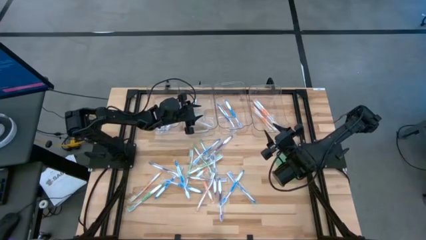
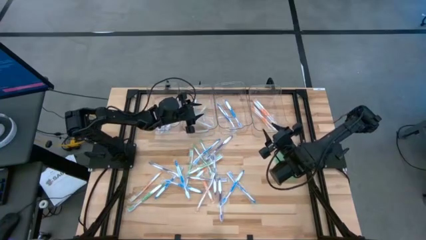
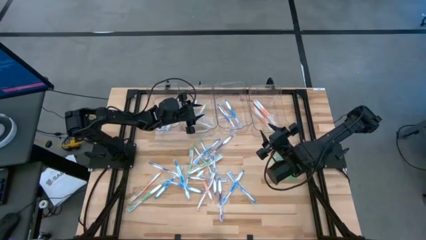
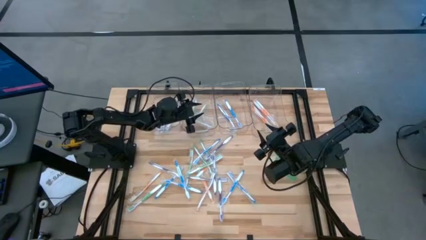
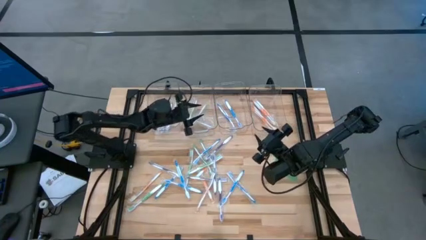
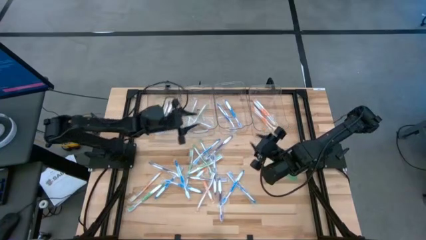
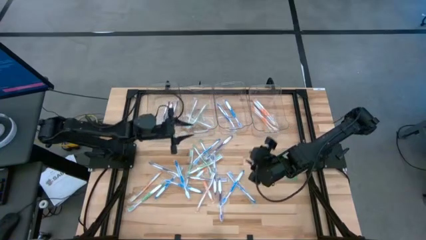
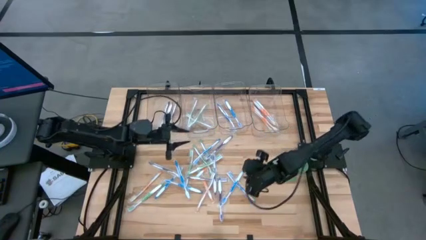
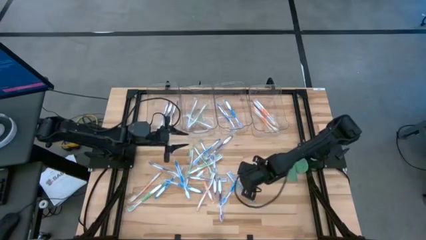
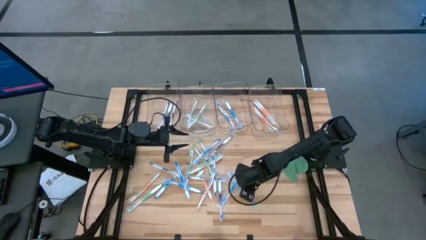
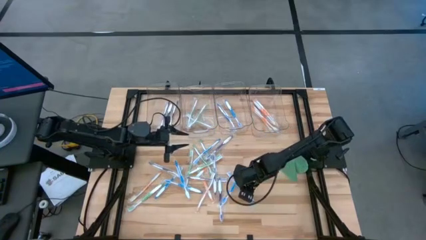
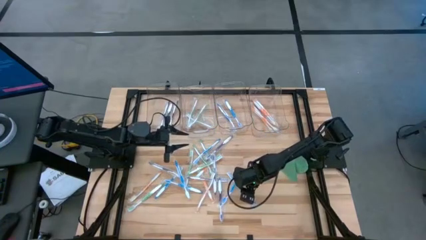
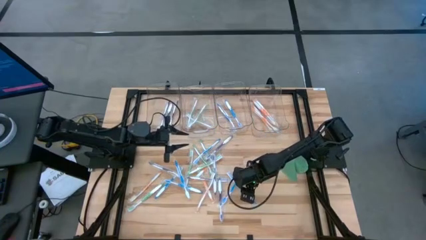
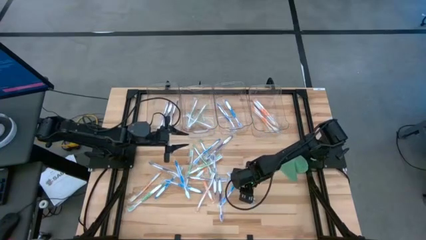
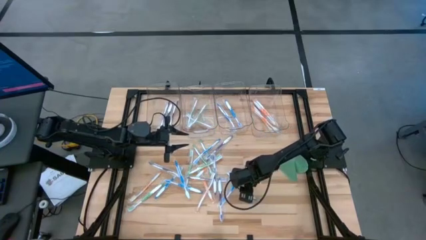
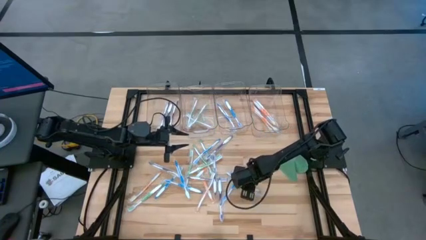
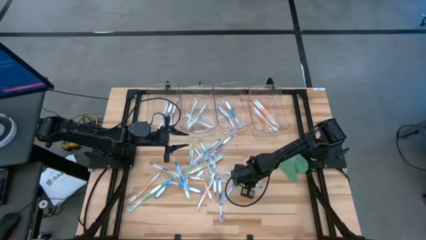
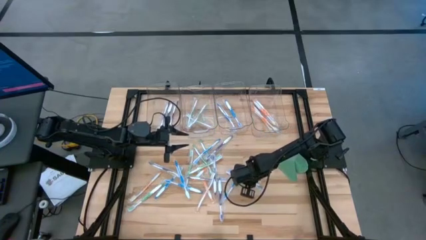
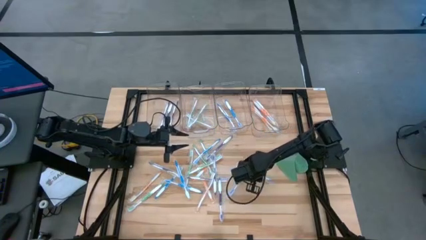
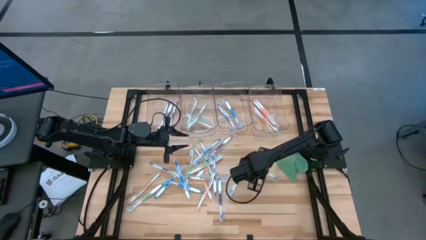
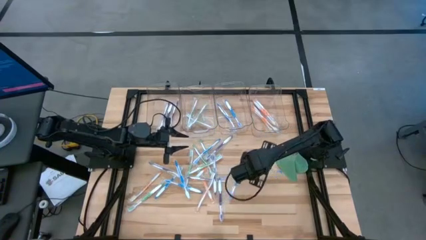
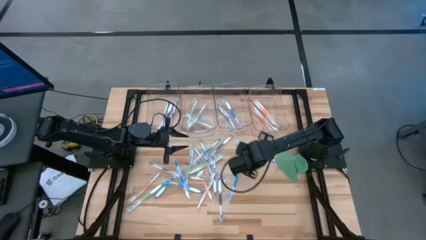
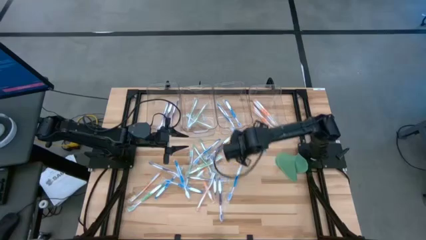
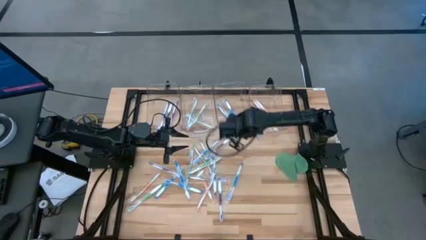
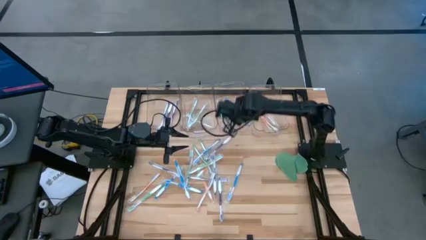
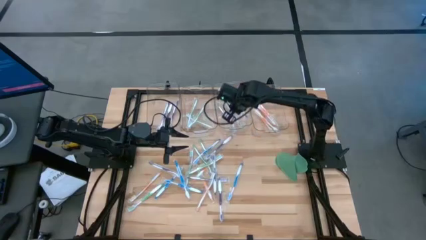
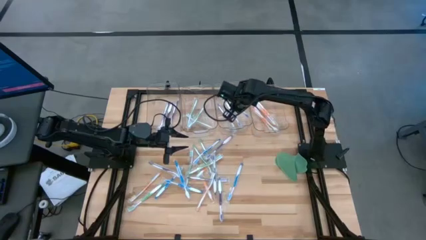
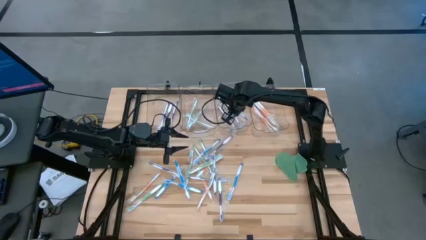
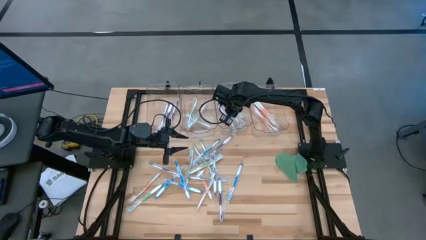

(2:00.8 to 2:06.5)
Task: Pick & Place Toothbrushes
Put the blue toothbrush into the middle right transparent bin

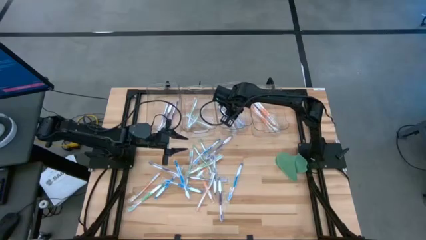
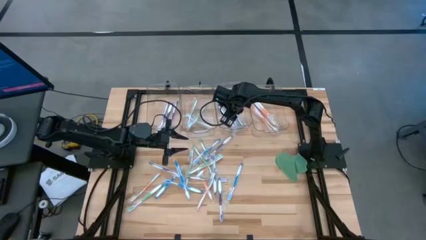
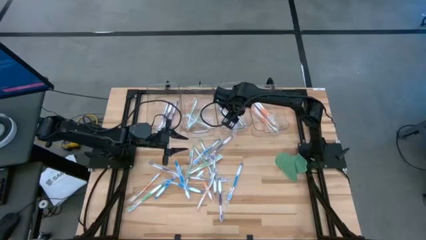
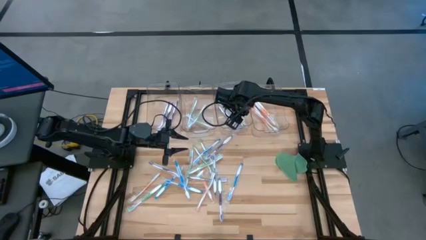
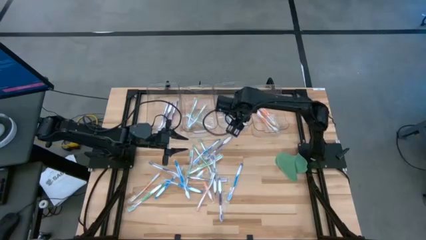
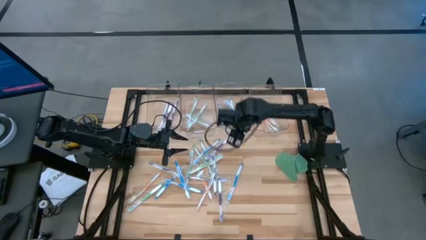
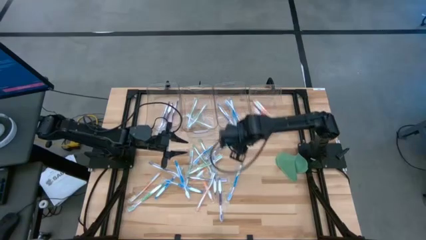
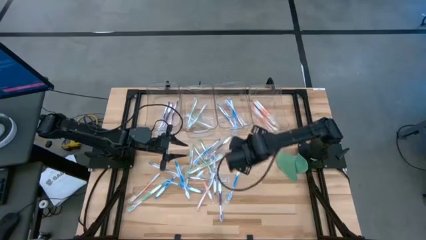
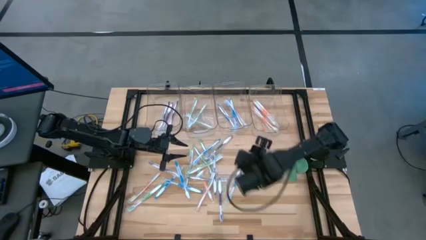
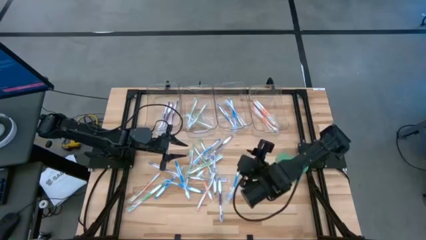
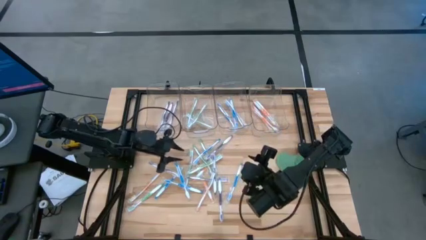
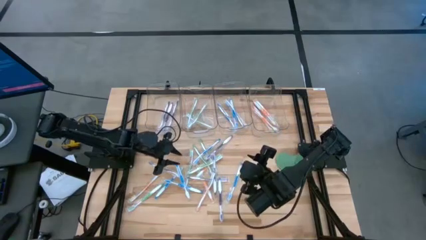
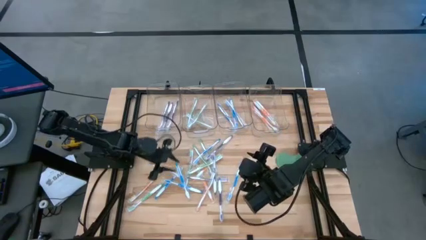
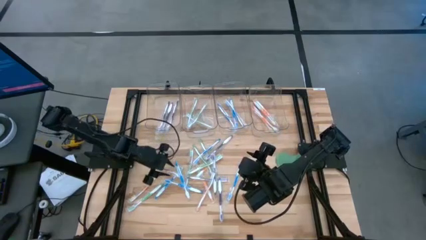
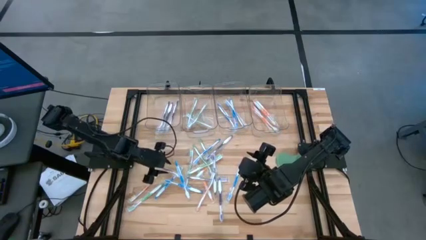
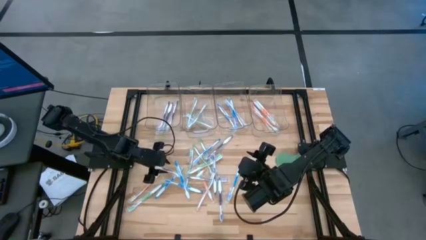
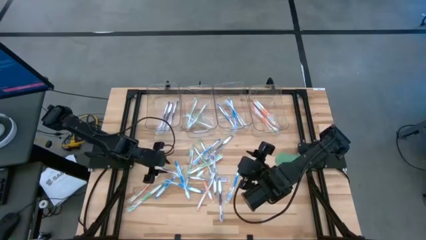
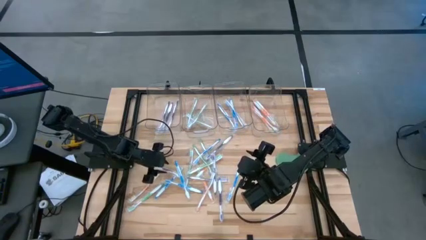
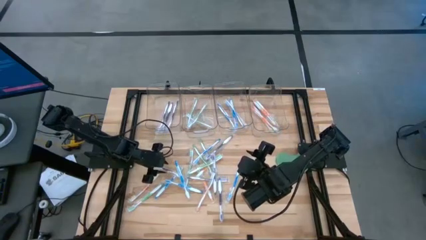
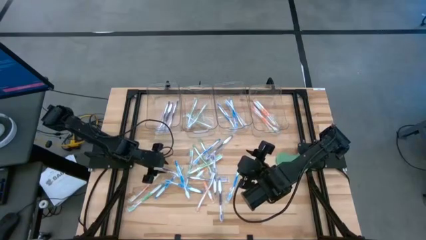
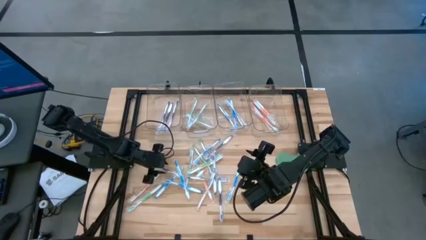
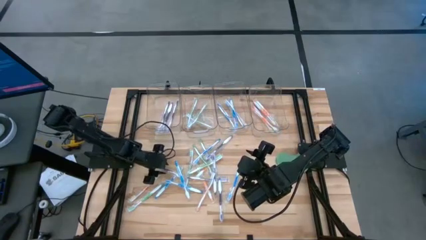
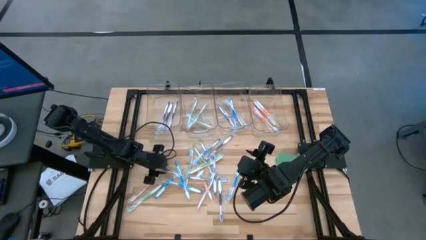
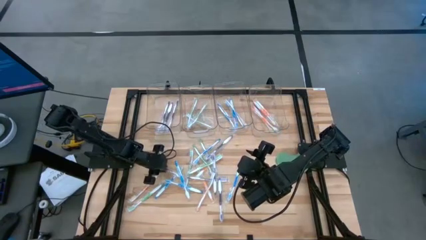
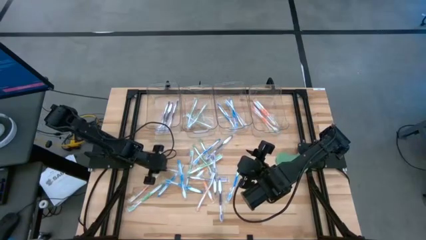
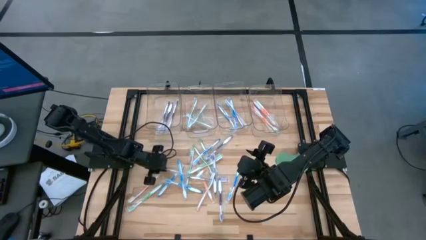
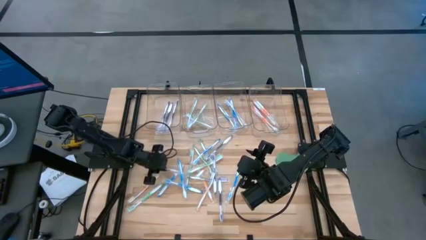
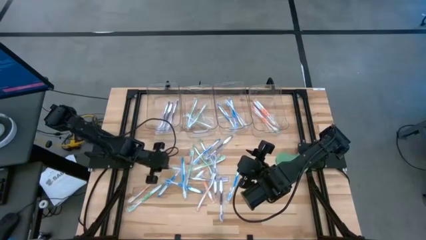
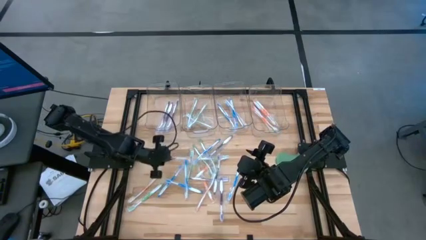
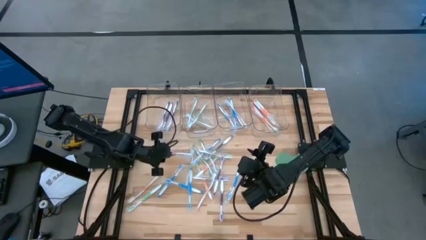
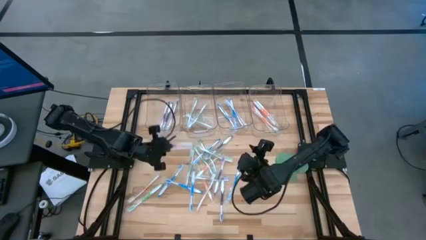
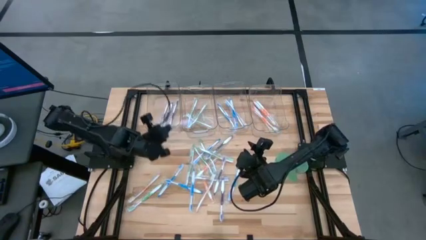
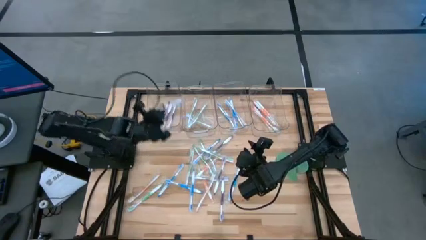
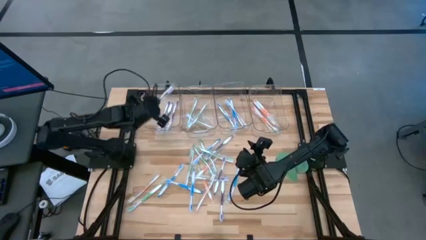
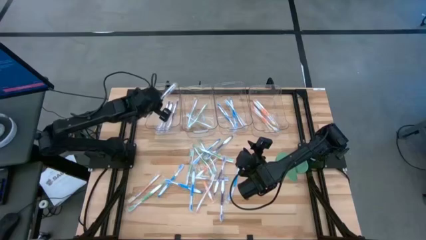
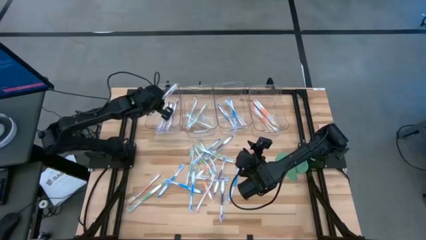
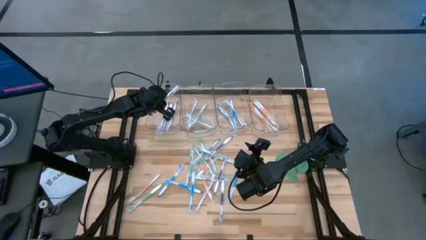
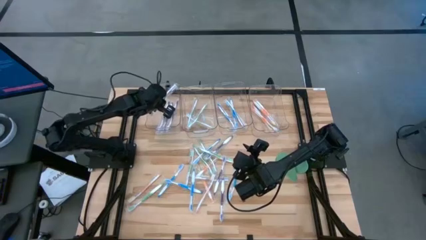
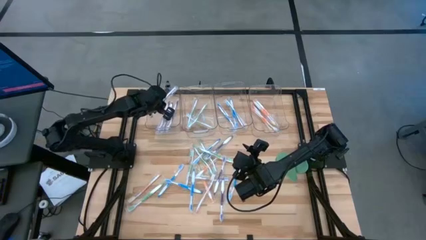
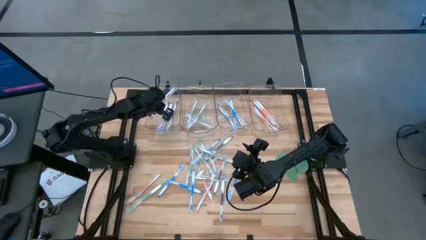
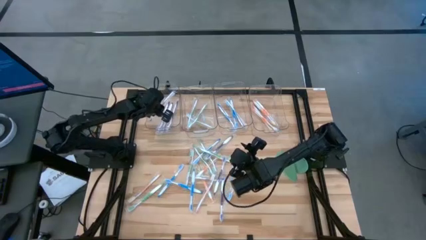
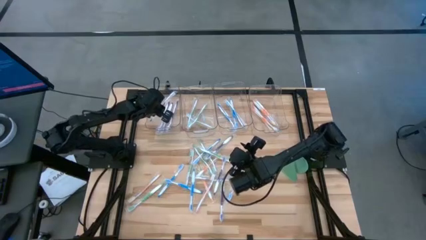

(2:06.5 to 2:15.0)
Put the purple toothbrush into the left transparent bin

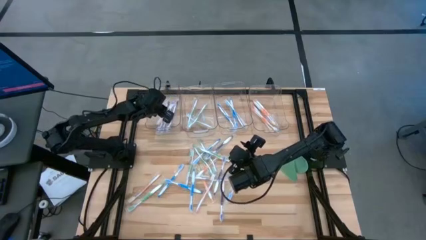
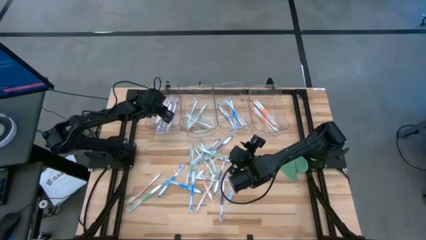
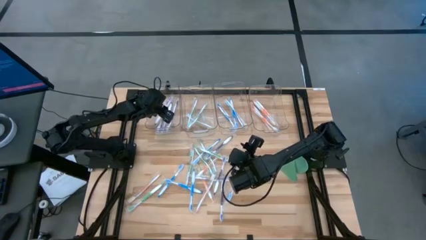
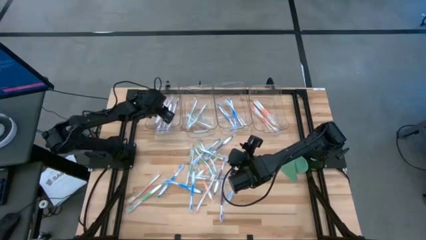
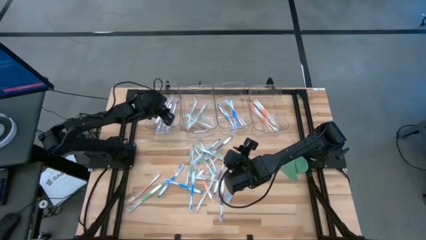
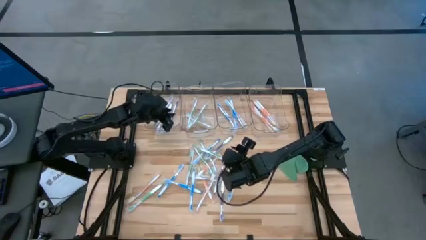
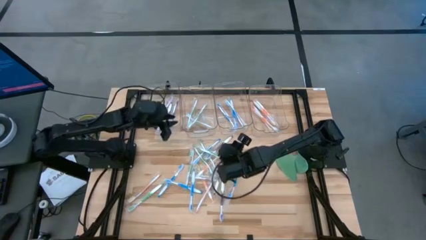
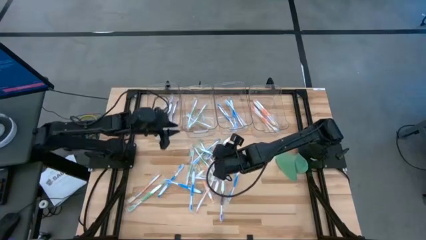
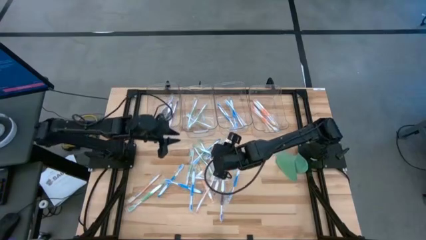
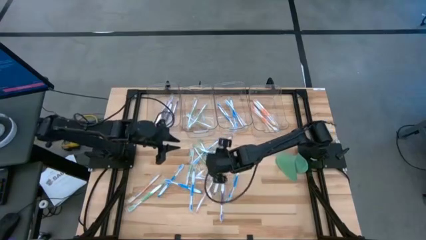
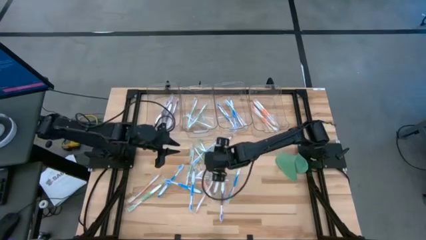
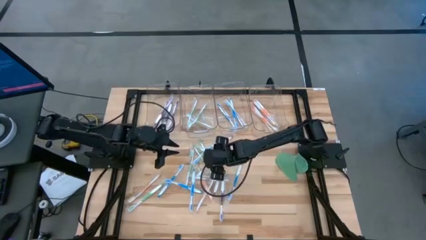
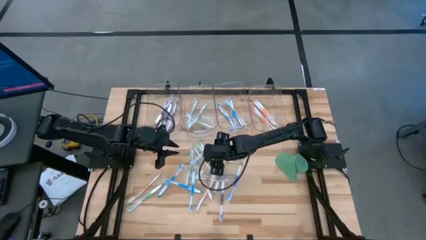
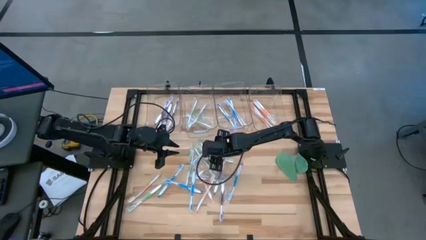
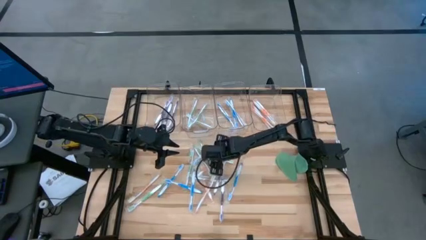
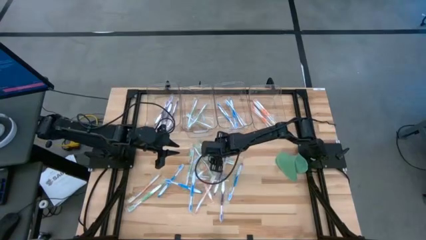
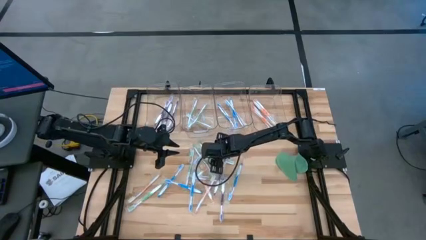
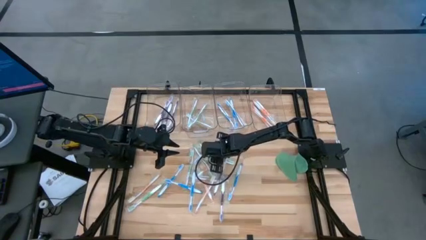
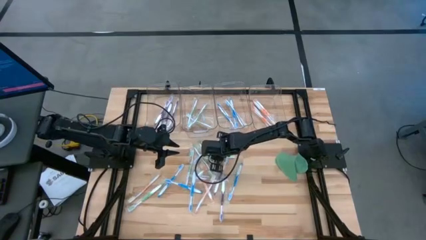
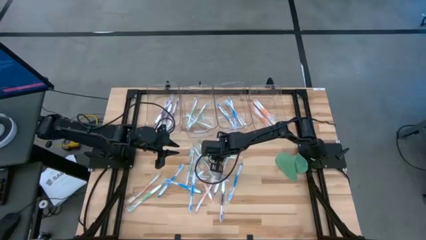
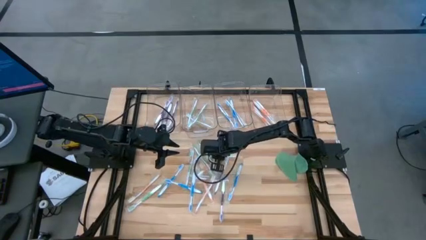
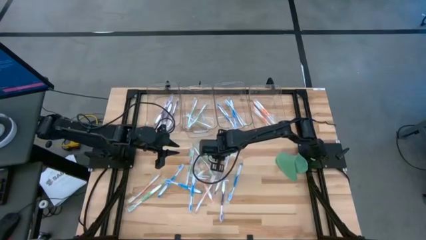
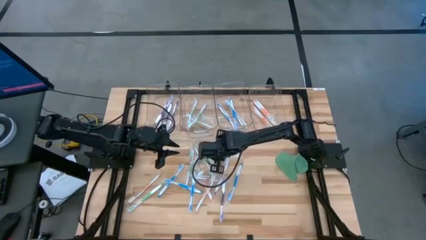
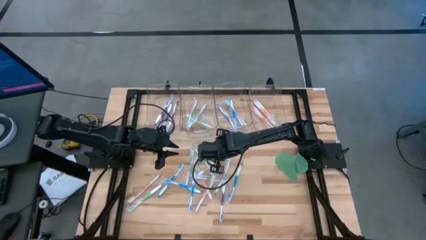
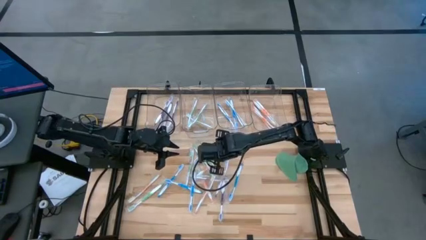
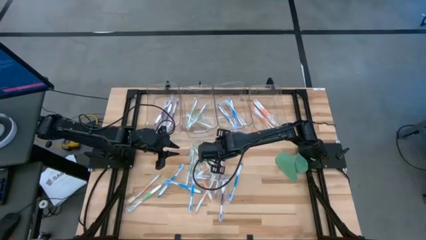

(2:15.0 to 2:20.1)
Put the green toothbrush into the middle left transparent bin
